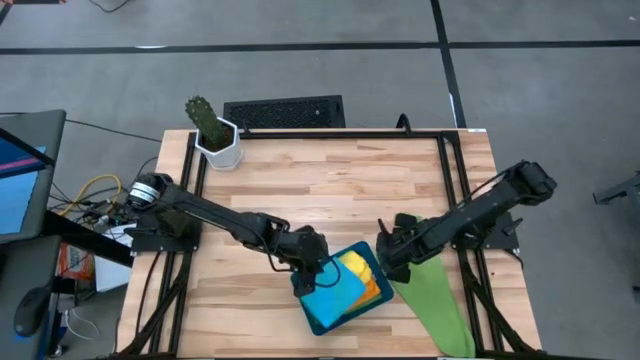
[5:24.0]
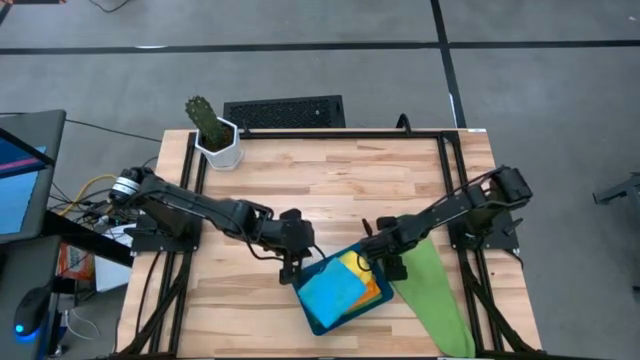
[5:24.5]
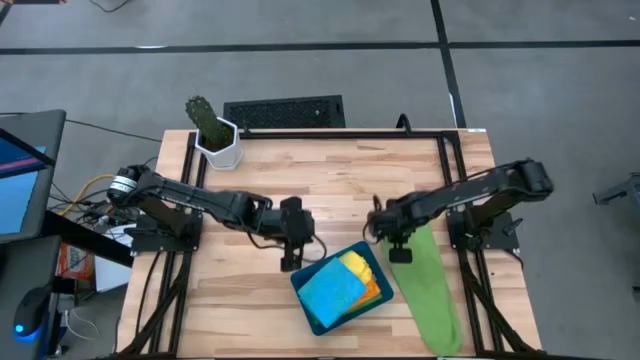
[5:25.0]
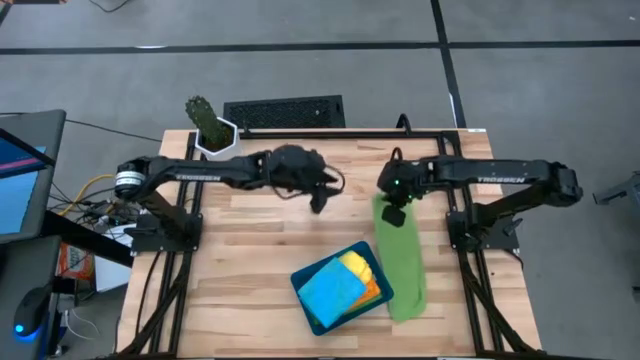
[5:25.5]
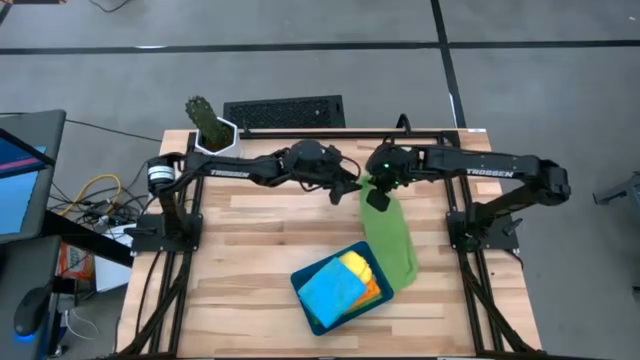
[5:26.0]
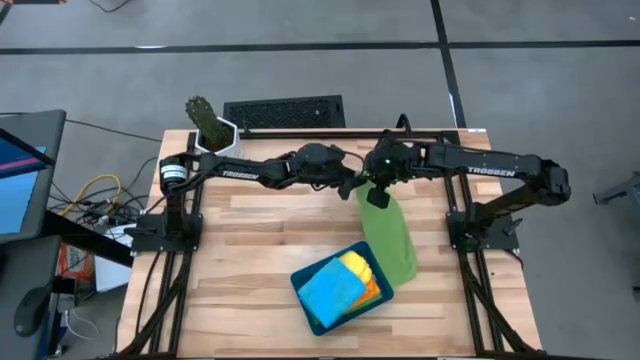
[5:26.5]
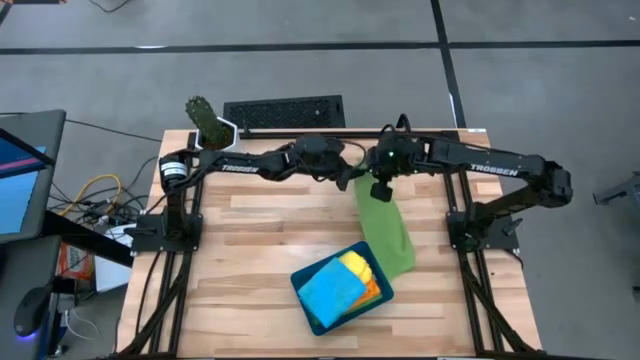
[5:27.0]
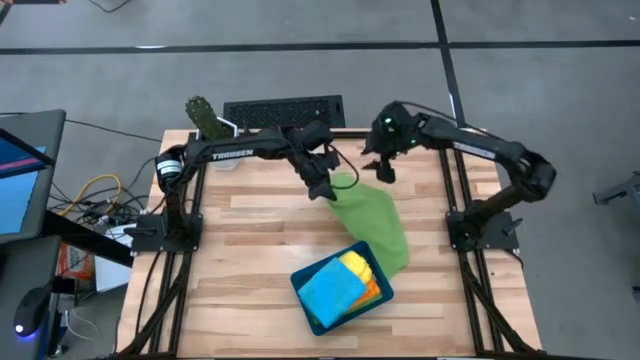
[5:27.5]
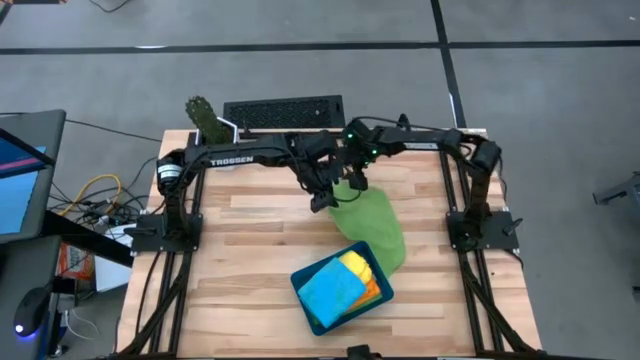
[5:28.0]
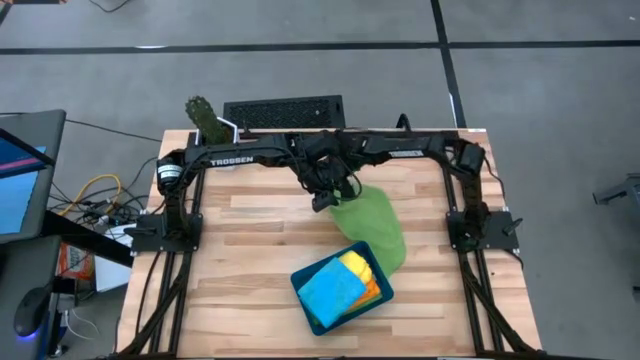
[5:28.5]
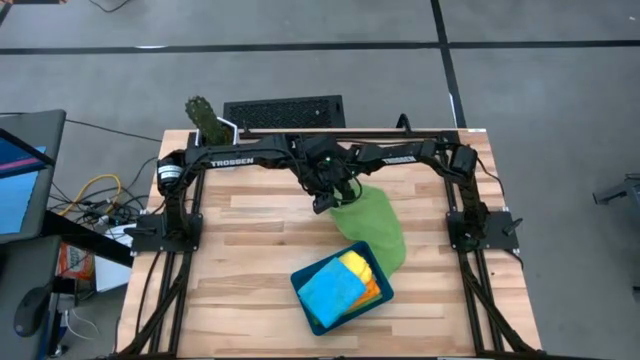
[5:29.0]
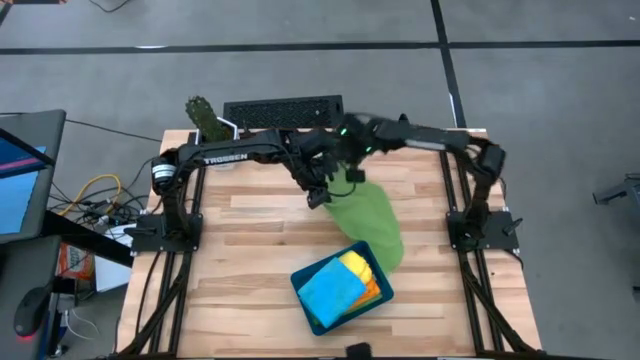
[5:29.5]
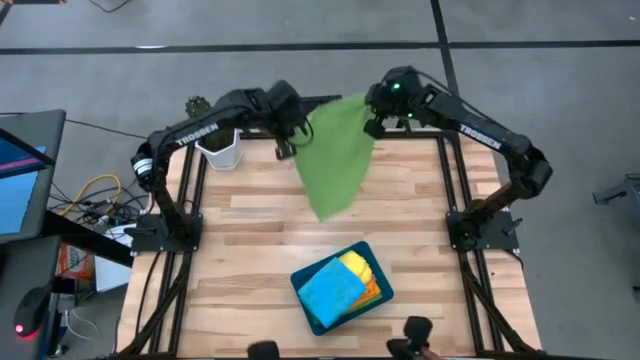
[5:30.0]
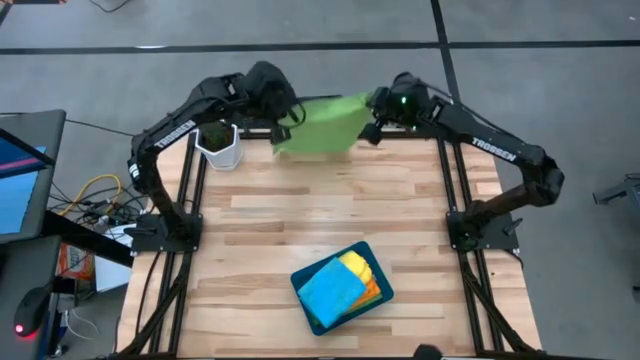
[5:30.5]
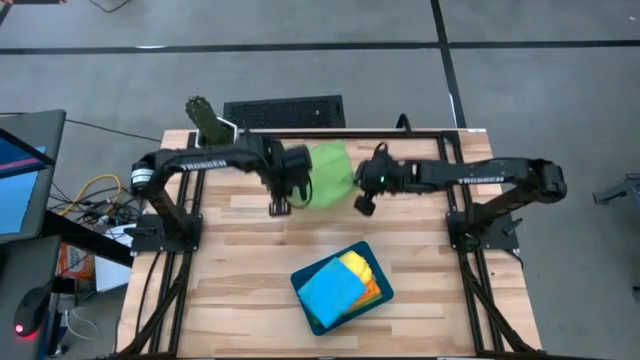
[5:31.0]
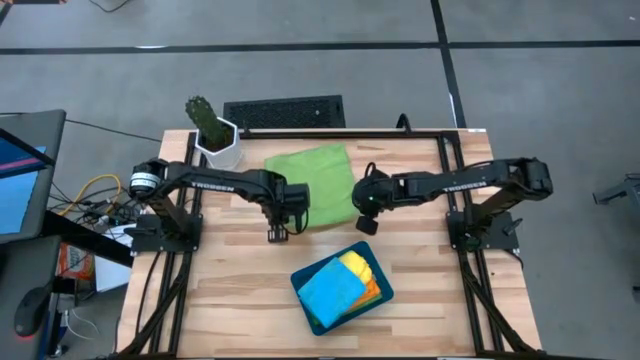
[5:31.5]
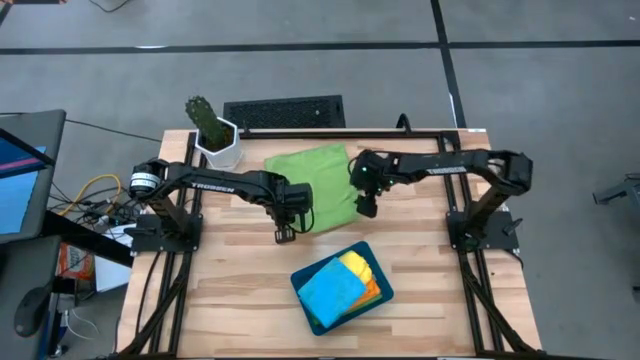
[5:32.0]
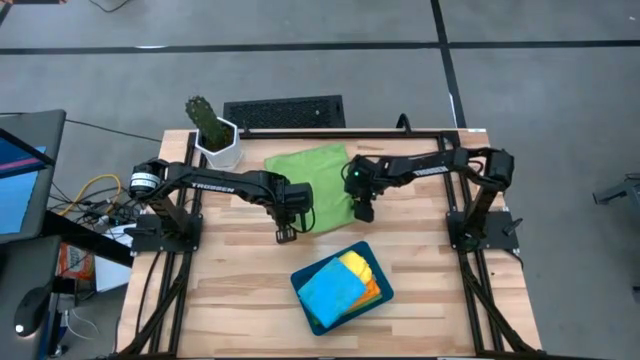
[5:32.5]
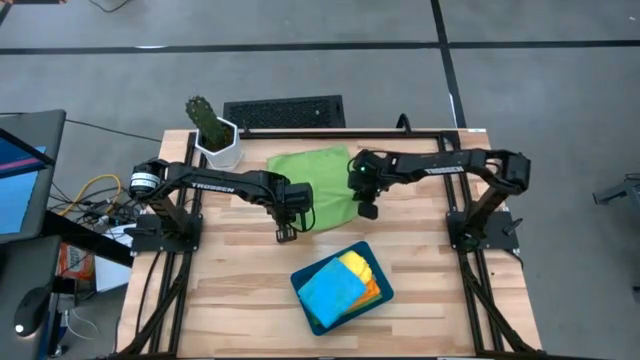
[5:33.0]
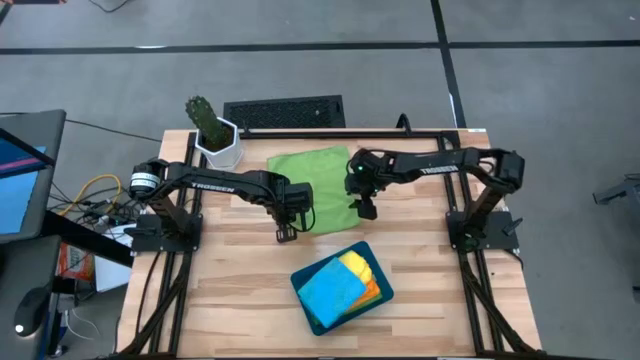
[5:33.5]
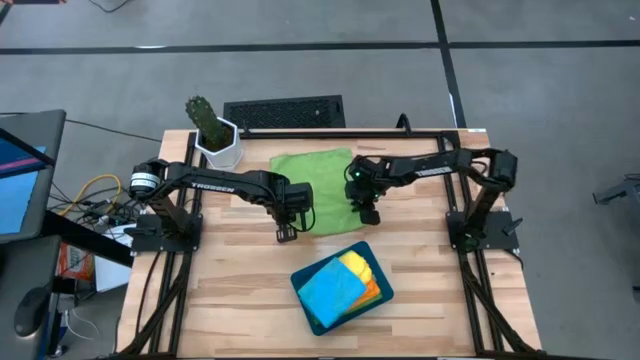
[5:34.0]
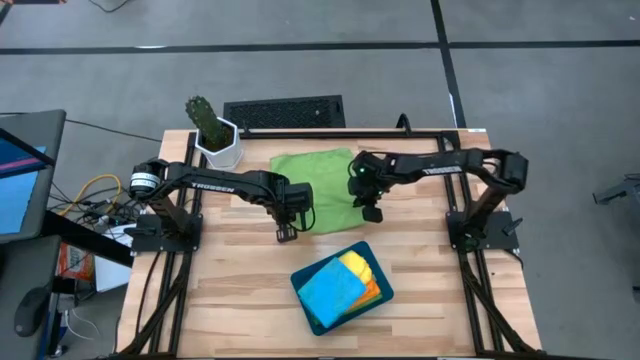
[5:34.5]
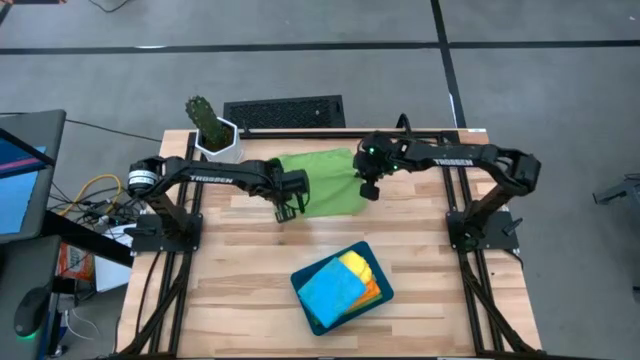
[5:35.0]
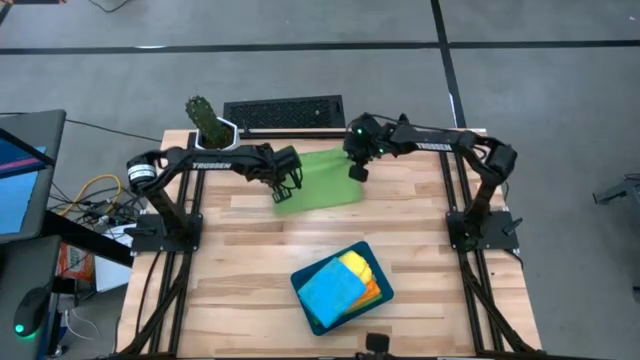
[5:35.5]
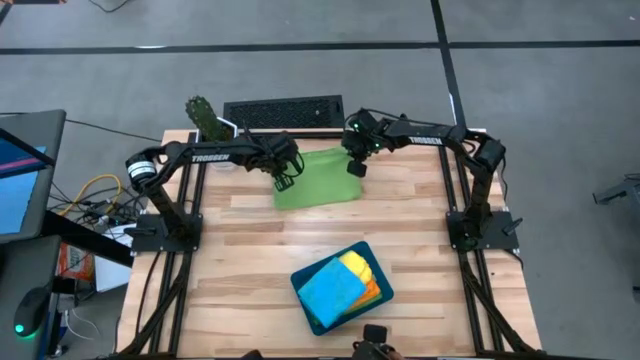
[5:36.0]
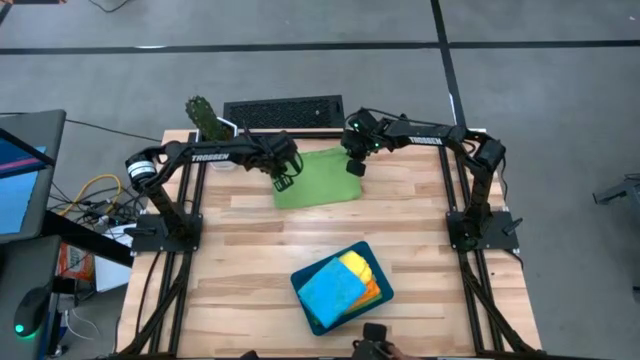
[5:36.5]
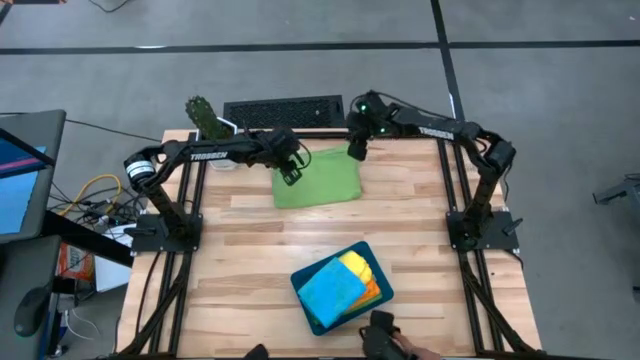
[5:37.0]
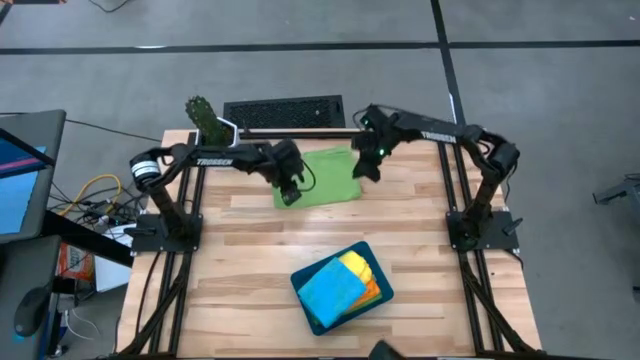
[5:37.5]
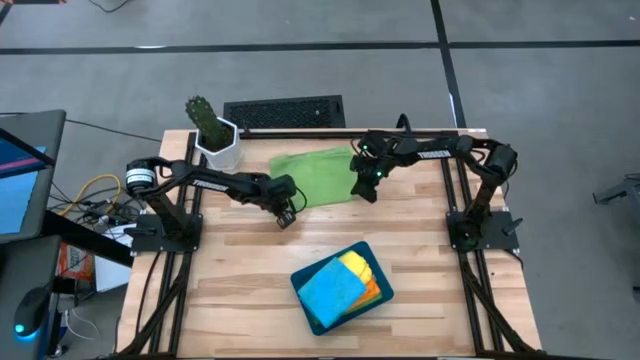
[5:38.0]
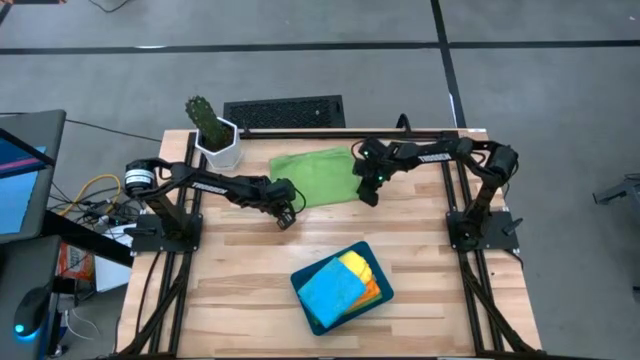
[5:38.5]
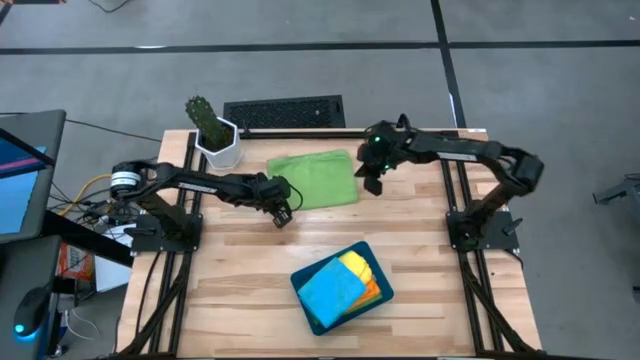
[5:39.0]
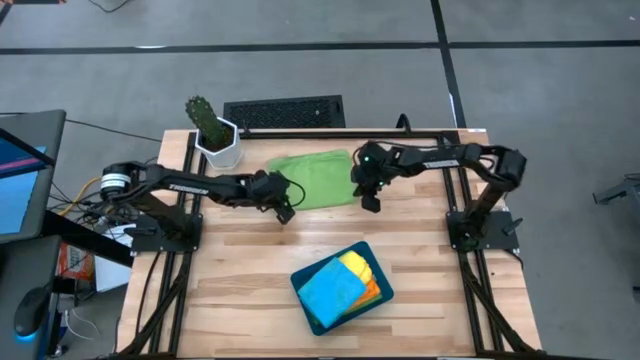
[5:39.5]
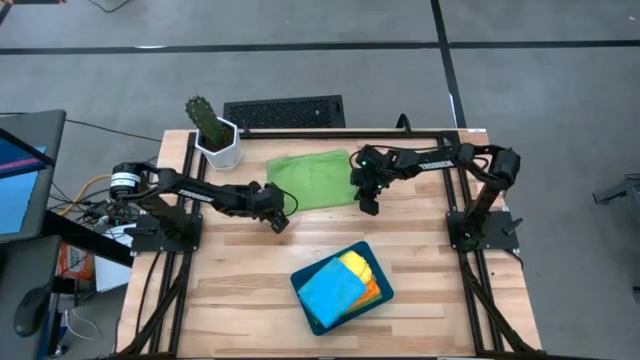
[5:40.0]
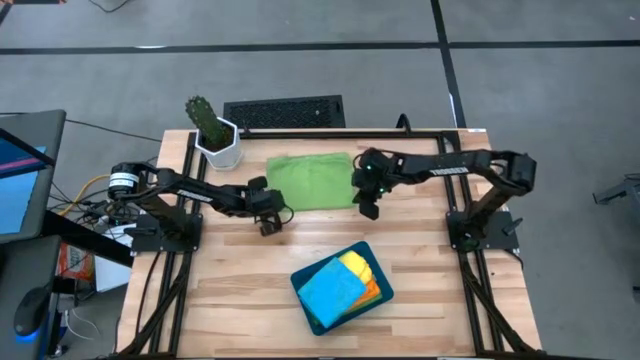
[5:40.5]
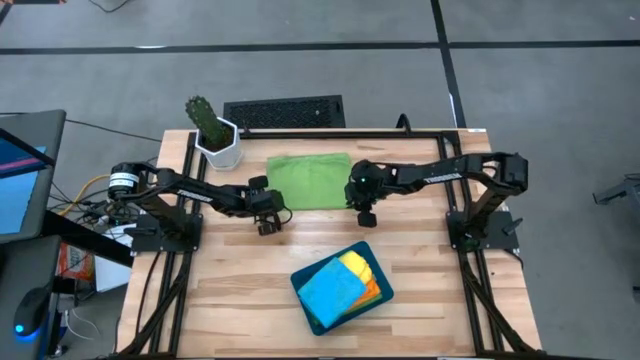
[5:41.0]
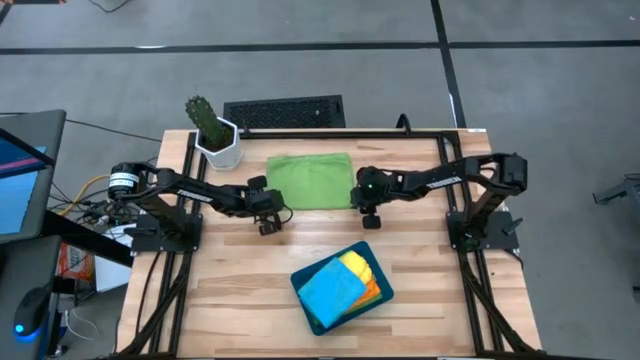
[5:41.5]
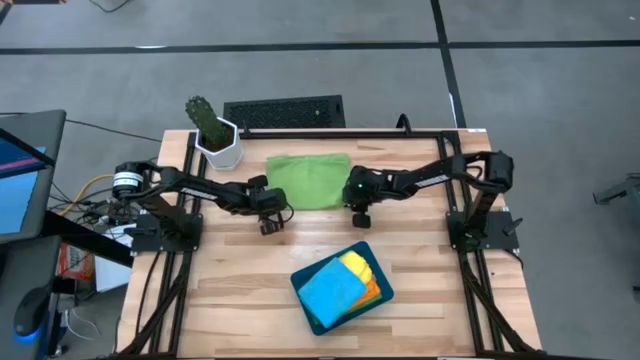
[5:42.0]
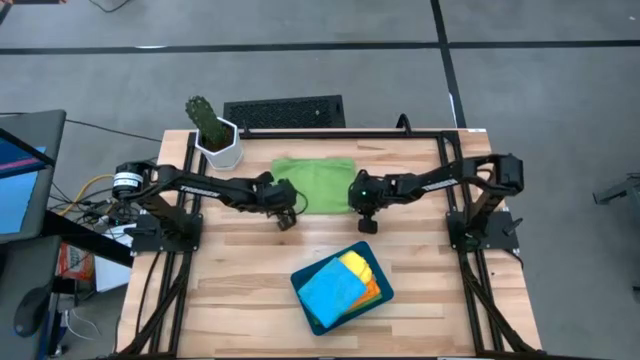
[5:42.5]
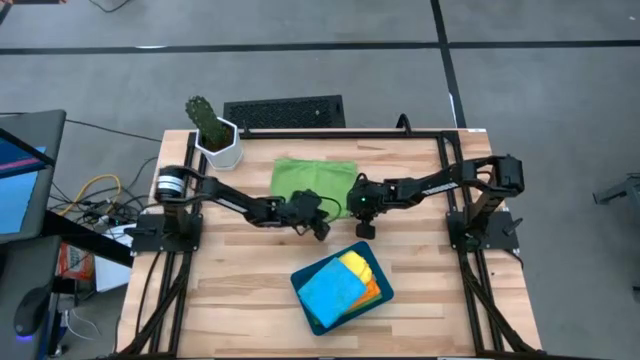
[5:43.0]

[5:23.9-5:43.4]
Task: Fold microfiber towels
Fold the green microfiber towel

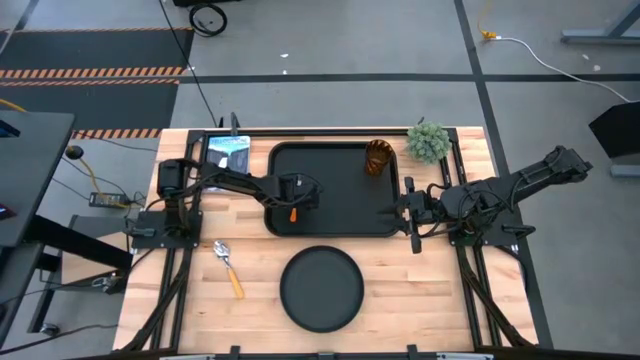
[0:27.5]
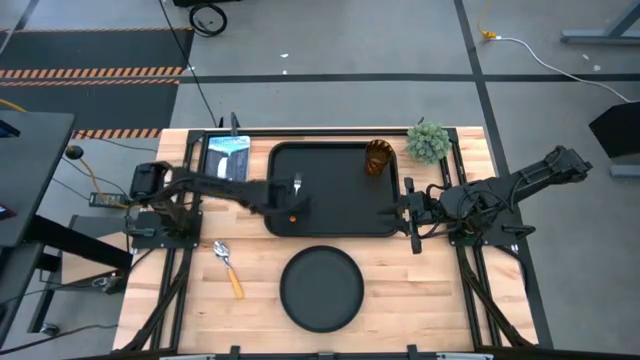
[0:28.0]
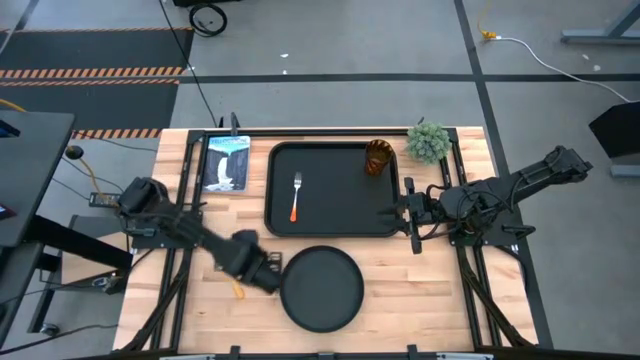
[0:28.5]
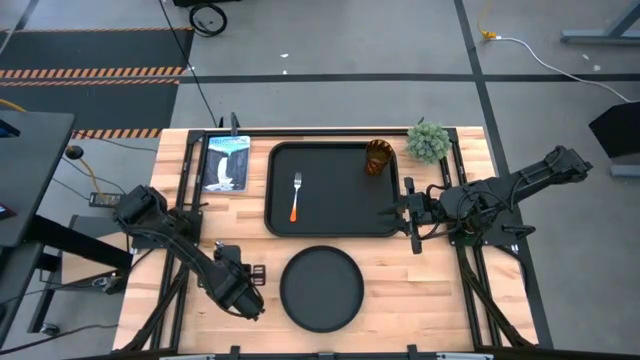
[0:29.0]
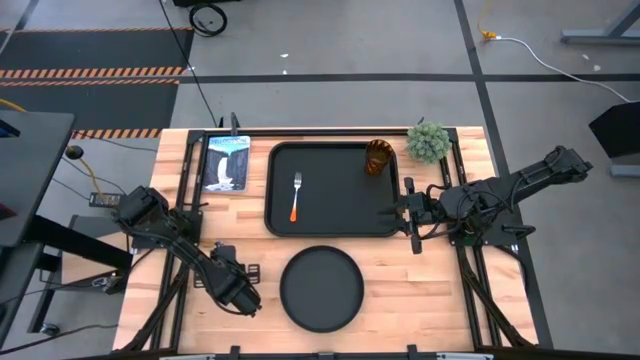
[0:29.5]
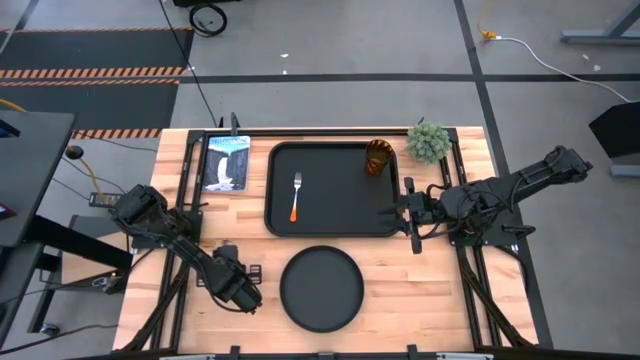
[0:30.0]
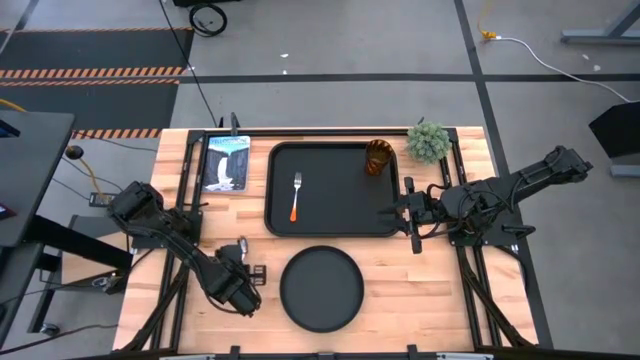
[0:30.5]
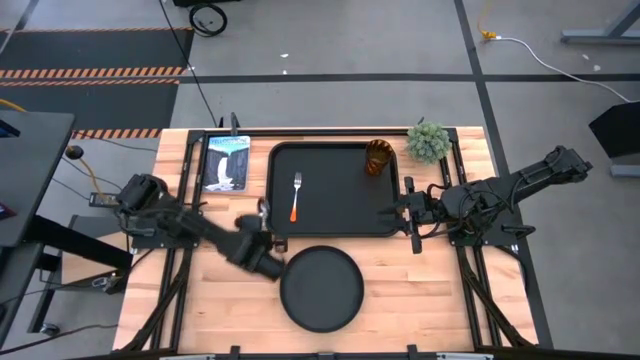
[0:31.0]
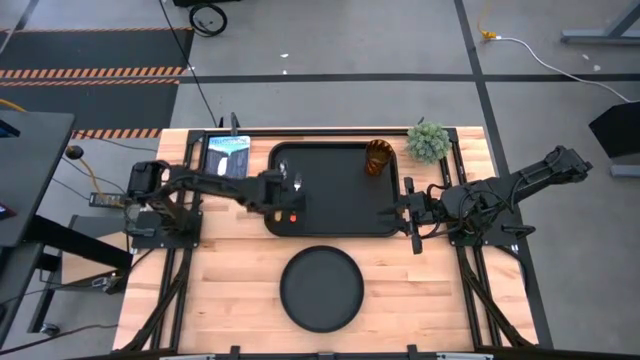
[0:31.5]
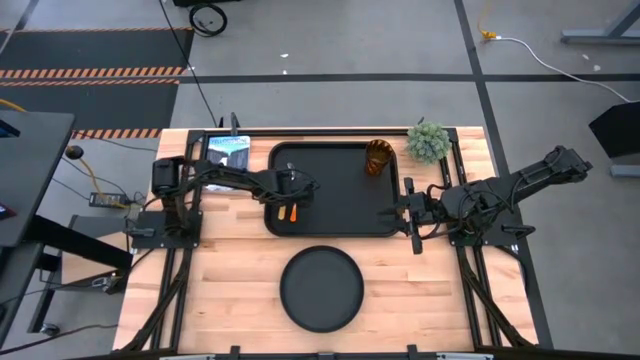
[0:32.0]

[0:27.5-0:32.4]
Task: Pick and place plate/cup/fork/spoon on tray
Put the yellow spoon on the black tray to the left of the orange fork
